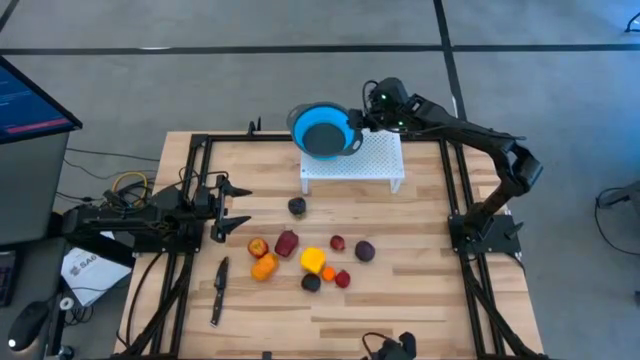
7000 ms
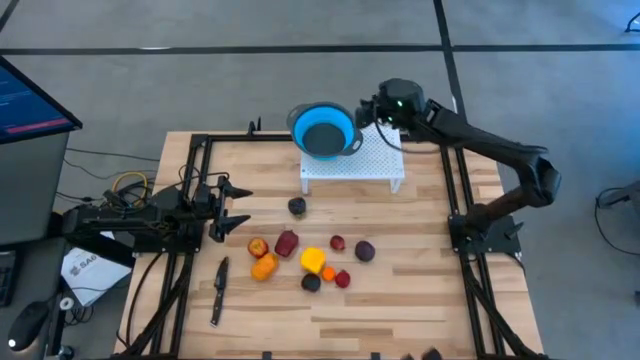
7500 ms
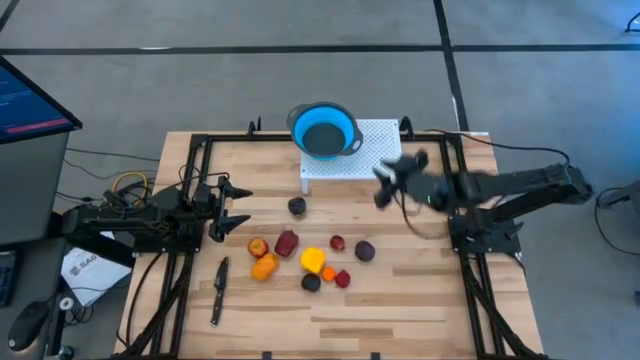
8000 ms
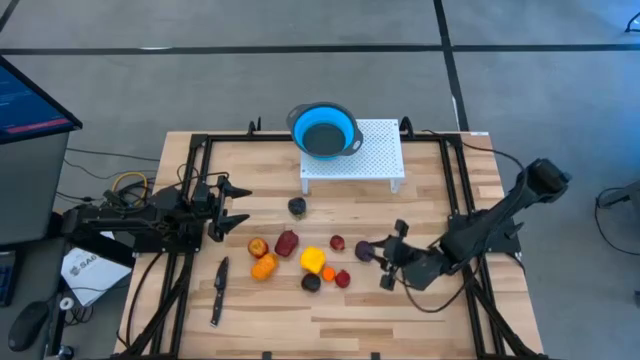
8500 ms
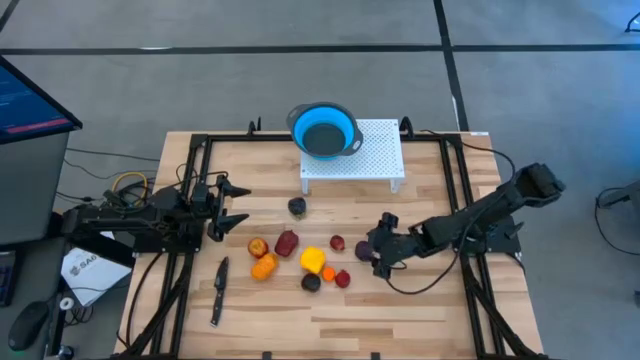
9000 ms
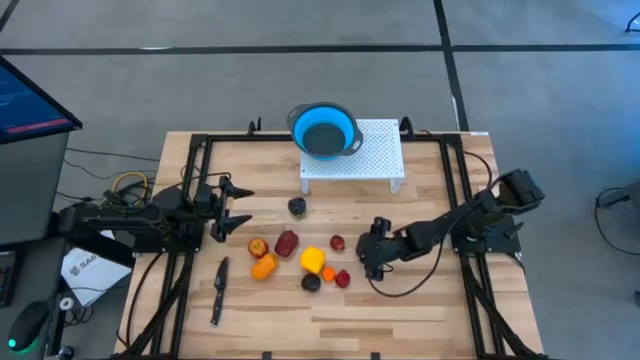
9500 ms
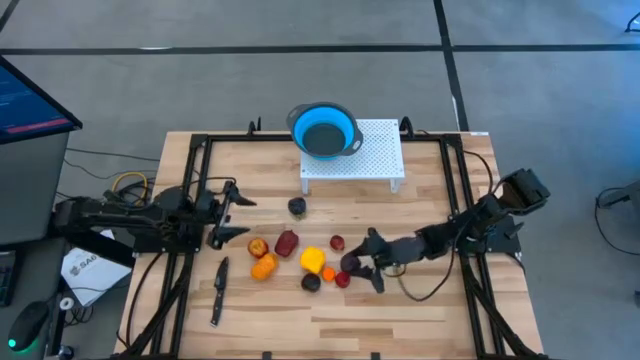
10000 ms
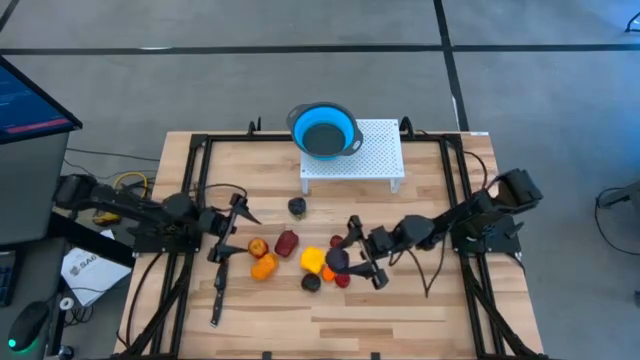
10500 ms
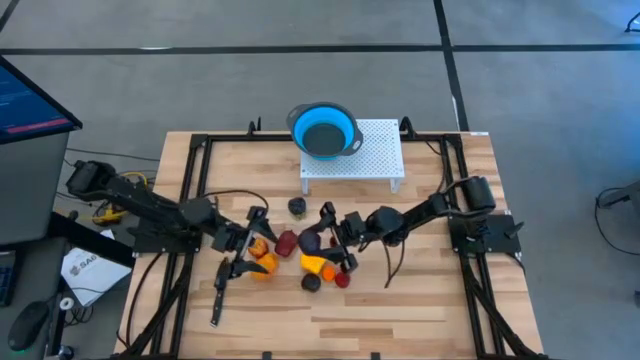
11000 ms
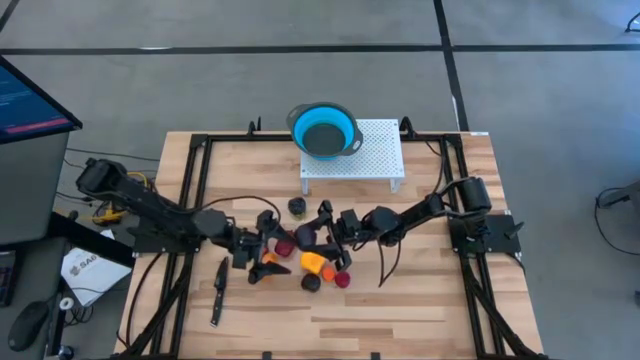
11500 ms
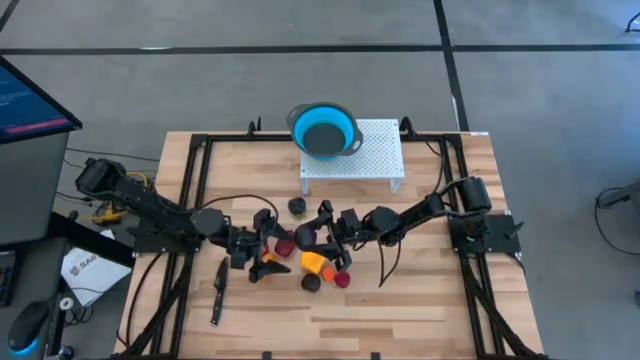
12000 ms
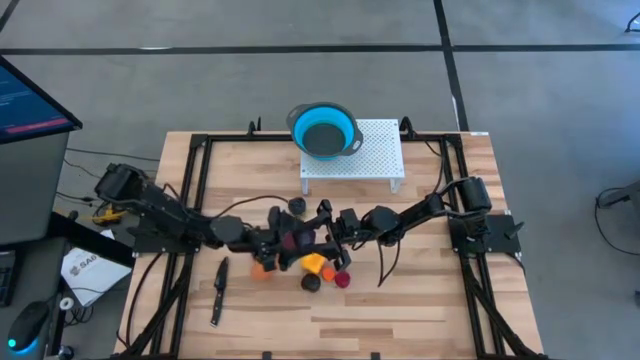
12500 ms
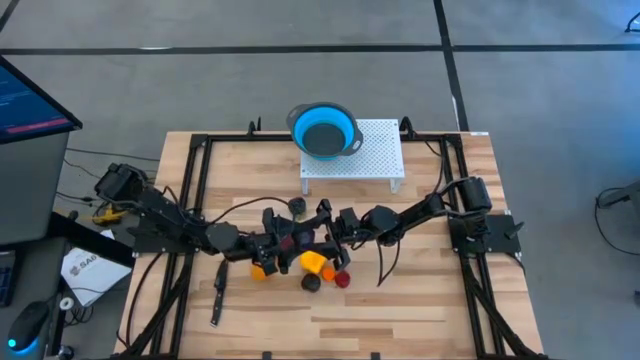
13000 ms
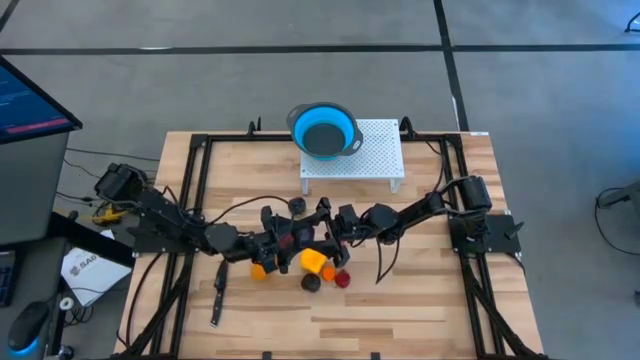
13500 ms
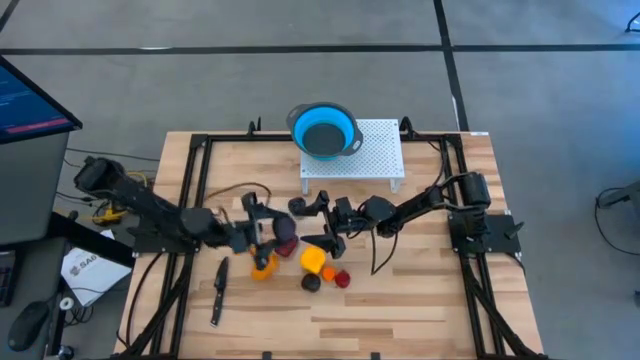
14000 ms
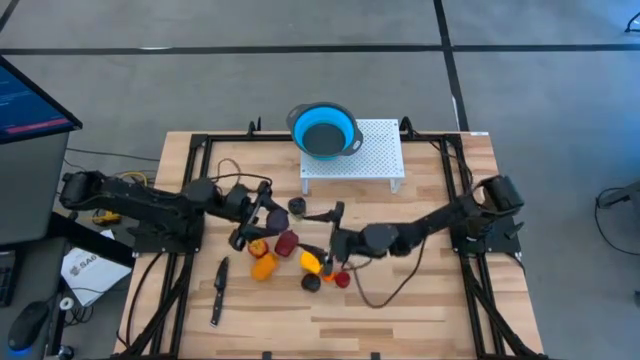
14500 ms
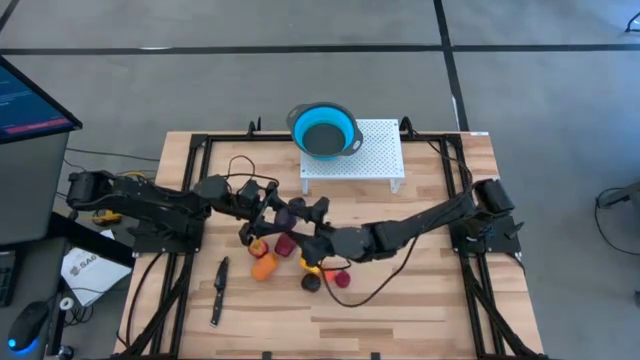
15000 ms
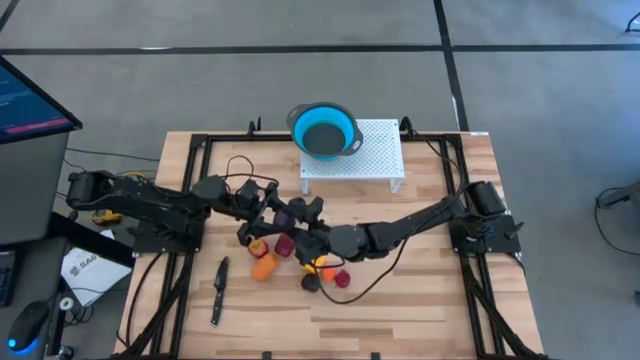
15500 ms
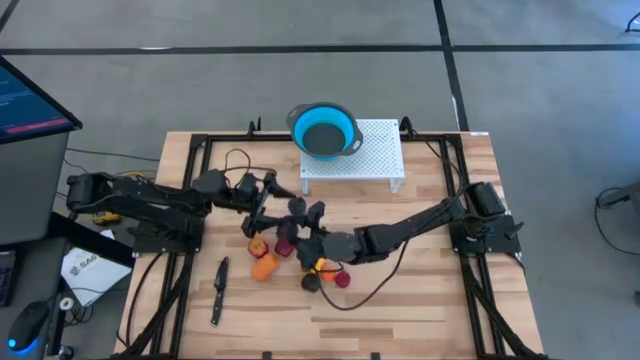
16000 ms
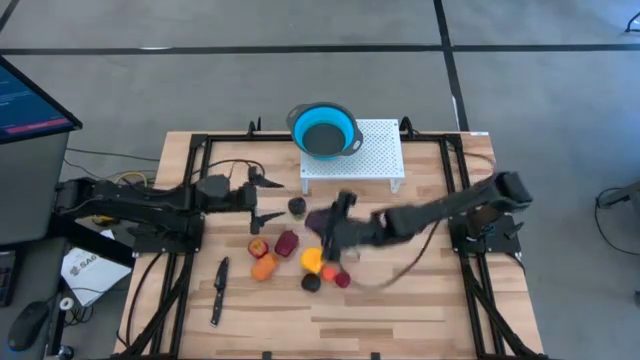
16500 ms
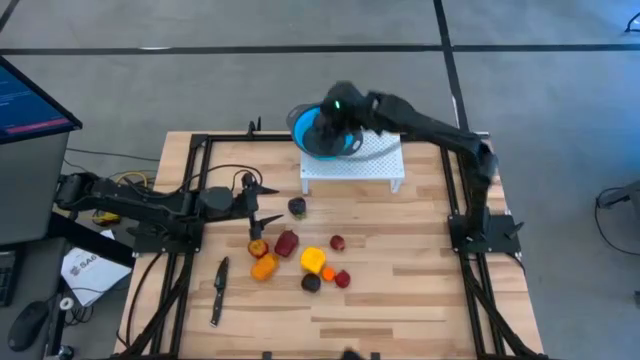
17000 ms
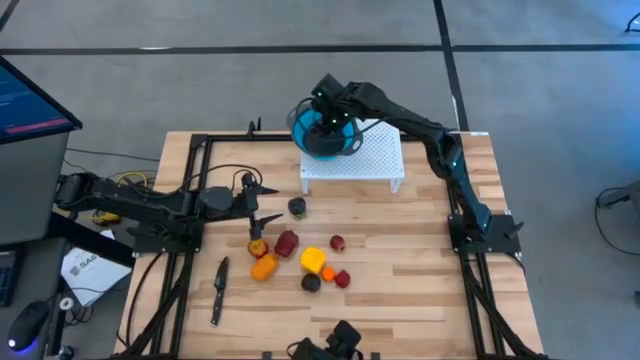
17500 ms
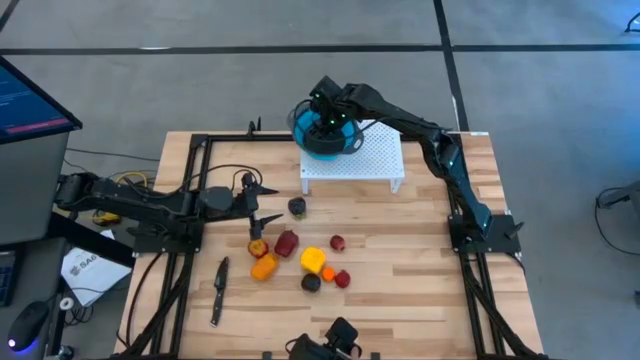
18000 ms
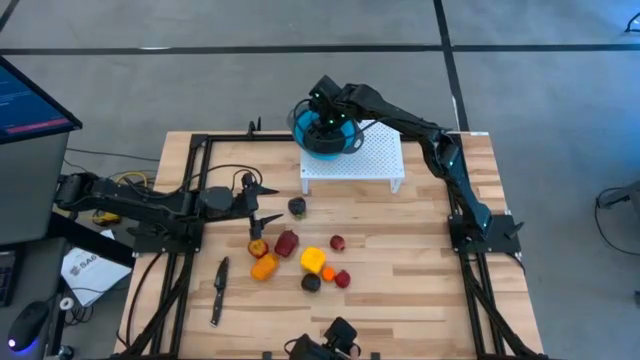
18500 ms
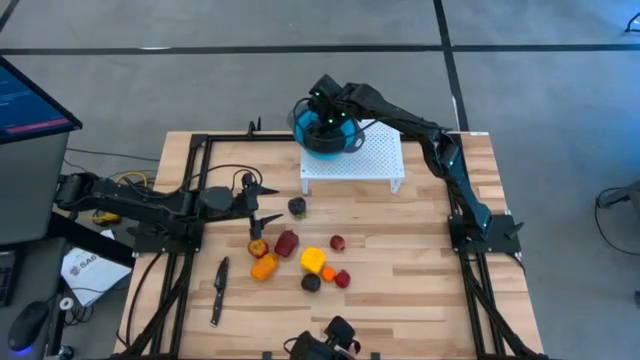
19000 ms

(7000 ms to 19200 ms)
Task: Pick & Place Fruit
Put the right purple plum into the blue strainer bowl on the shelf

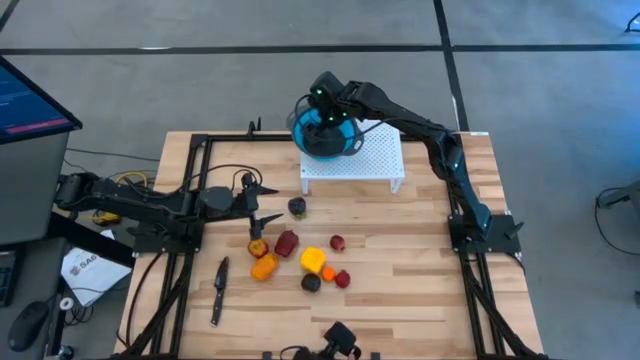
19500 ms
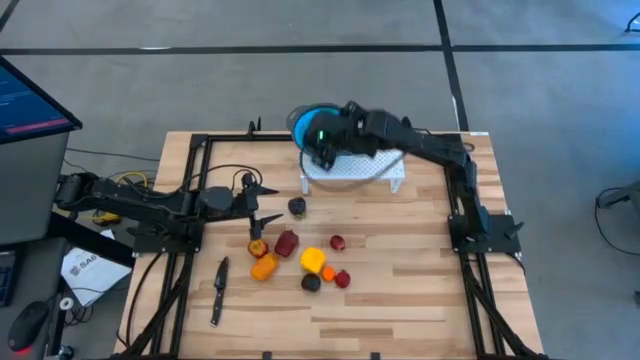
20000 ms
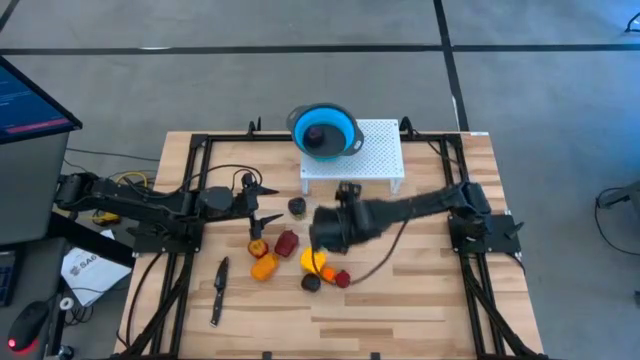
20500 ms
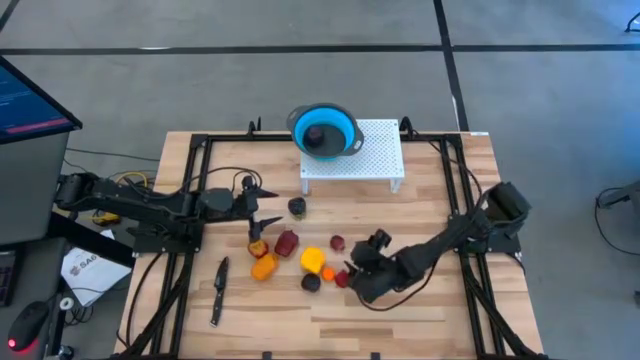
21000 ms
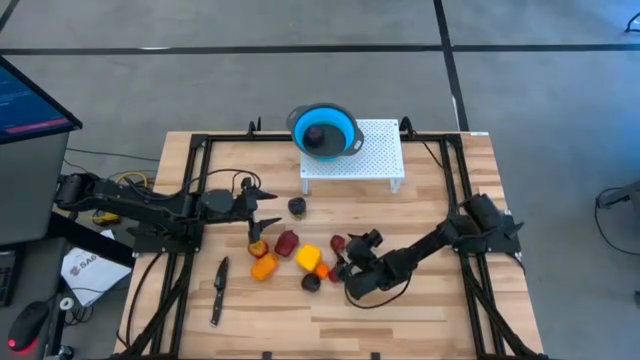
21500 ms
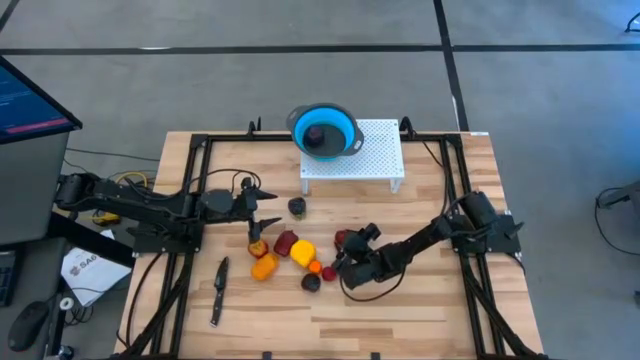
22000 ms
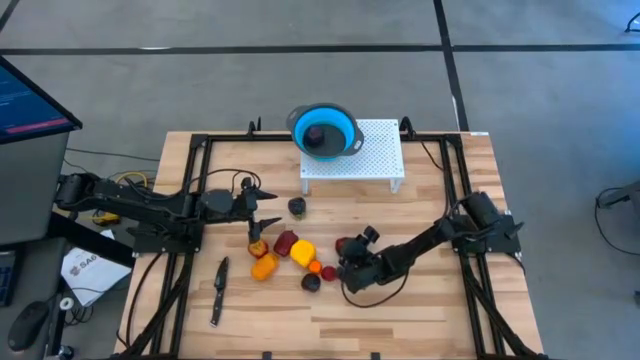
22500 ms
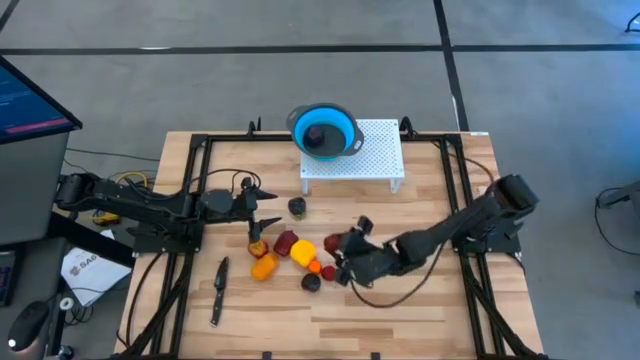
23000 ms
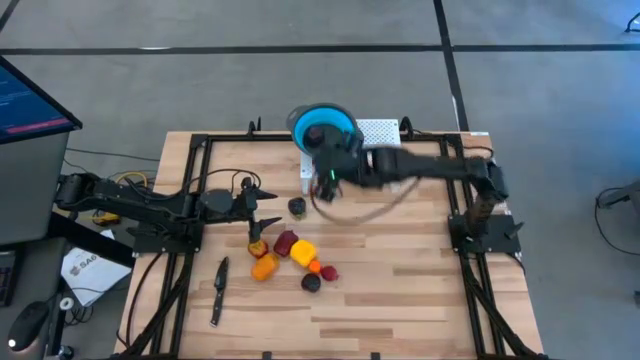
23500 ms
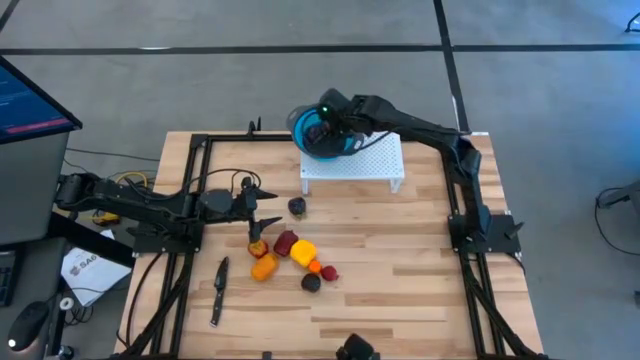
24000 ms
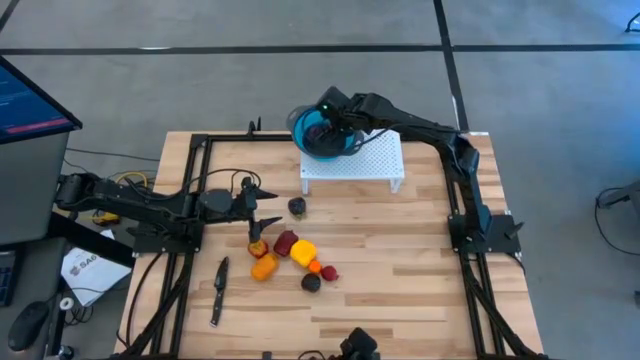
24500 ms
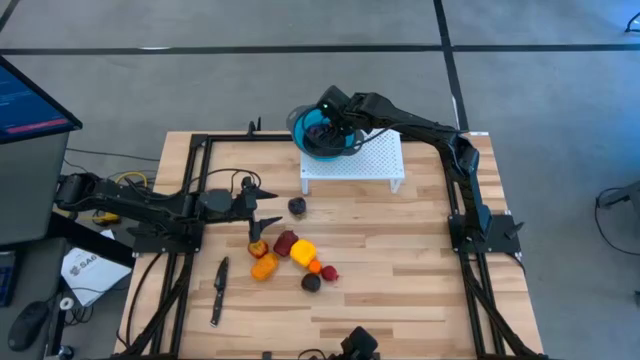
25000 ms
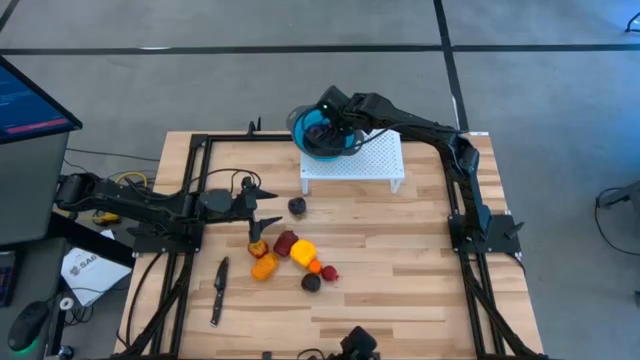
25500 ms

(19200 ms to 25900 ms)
Put the top red pomegranate into the blue strainer bowl on the shelf

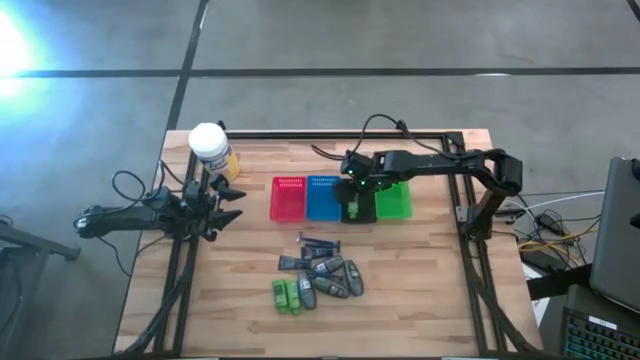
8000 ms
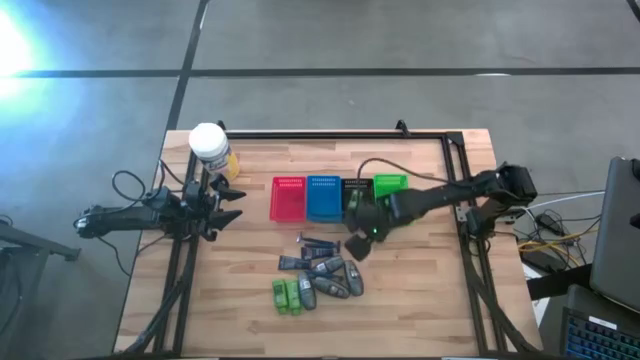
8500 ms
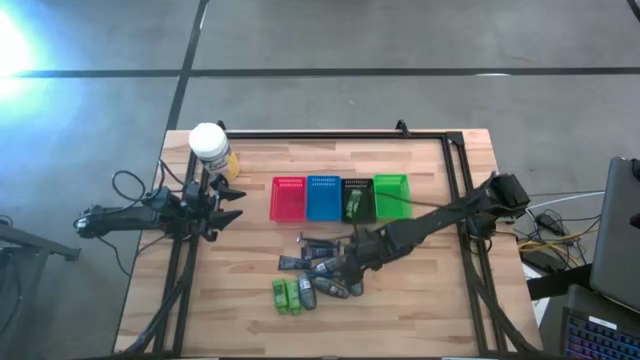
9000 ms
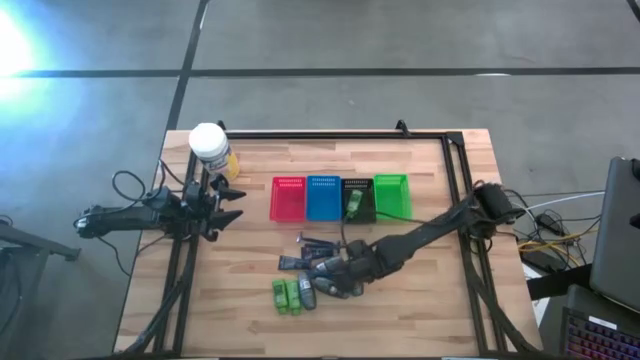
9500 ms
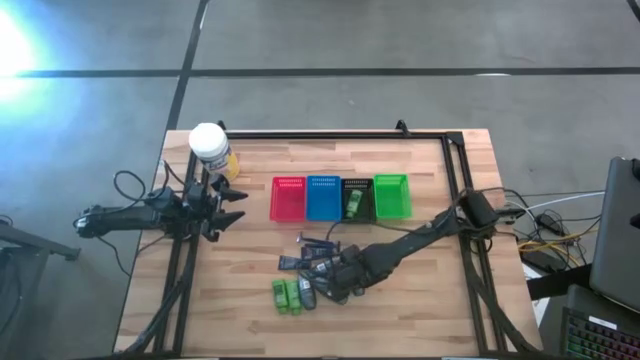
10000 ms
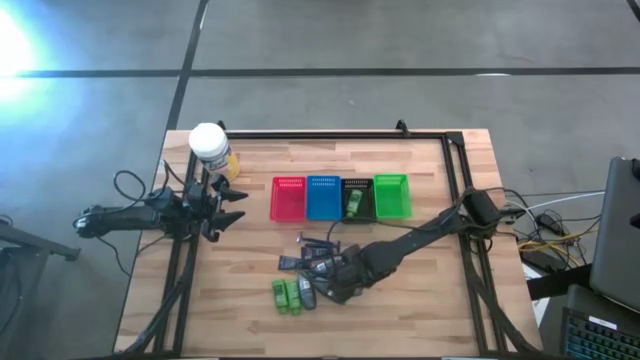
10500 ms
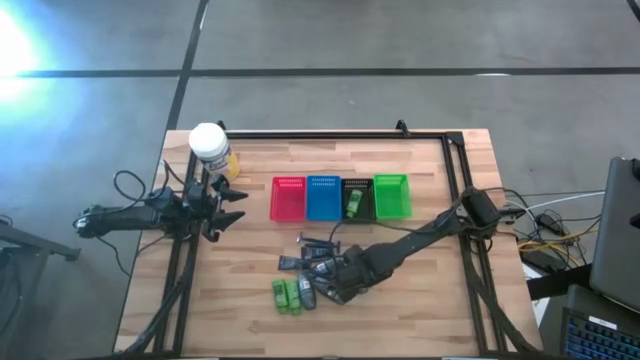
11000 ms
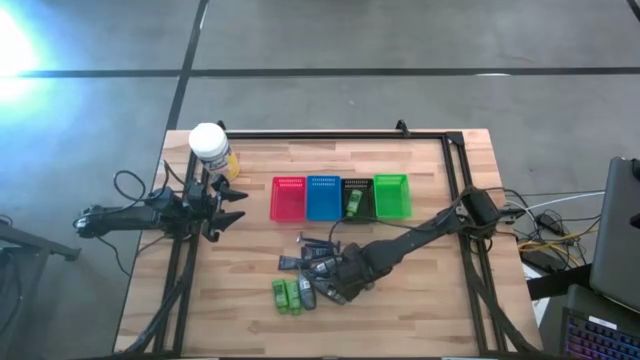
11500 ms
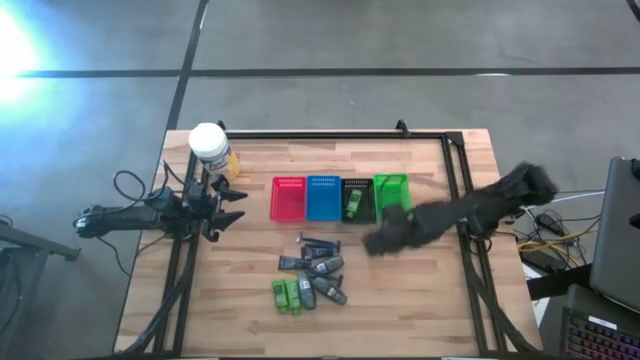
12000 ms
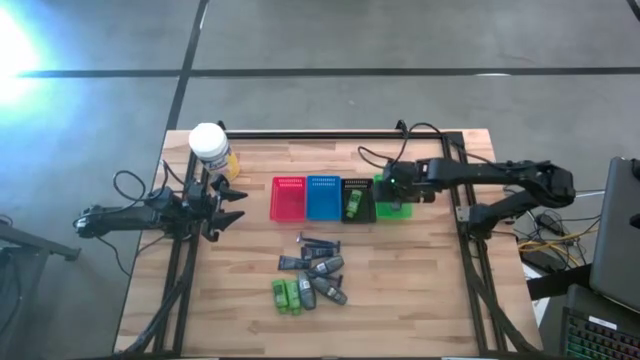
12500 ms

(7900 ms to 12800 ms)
Task: Pick & Place Travel size toiletries
Put the deodorant into the green basket
